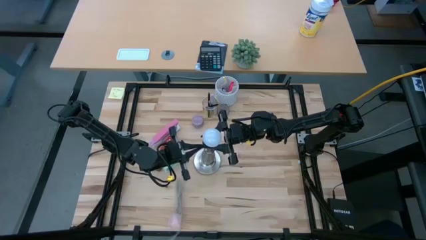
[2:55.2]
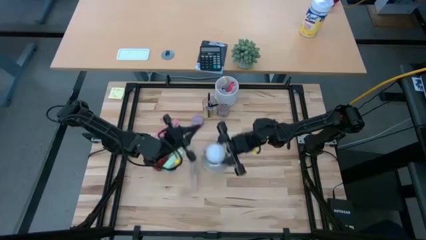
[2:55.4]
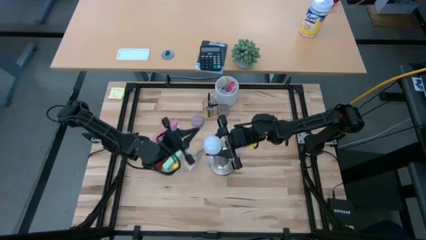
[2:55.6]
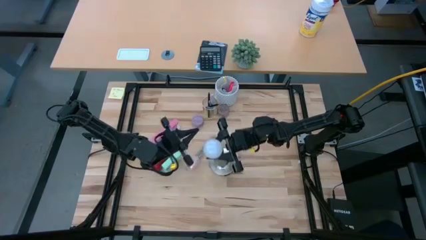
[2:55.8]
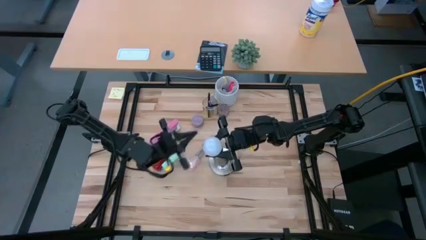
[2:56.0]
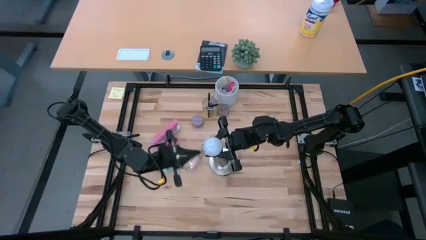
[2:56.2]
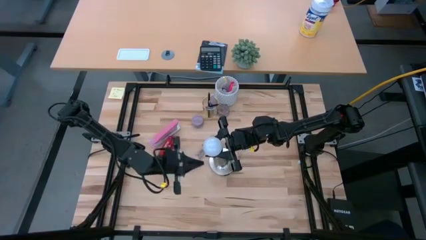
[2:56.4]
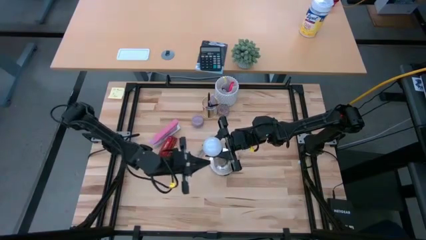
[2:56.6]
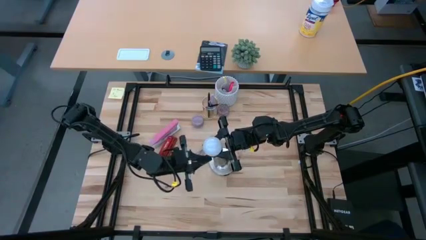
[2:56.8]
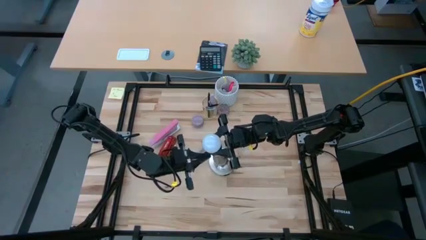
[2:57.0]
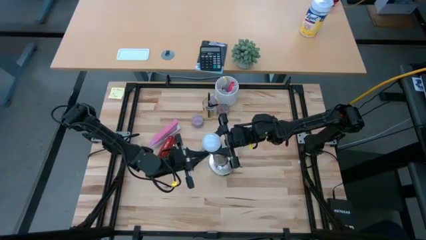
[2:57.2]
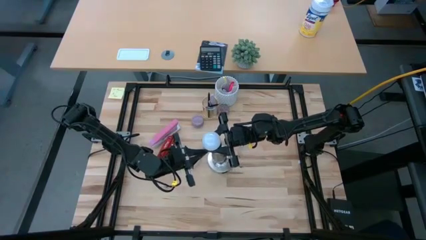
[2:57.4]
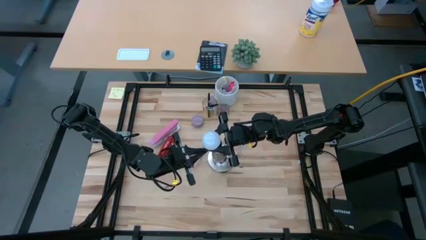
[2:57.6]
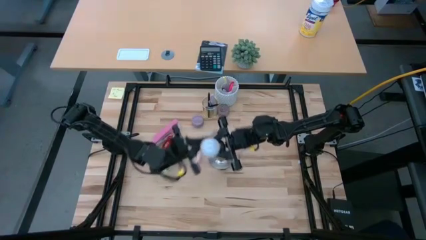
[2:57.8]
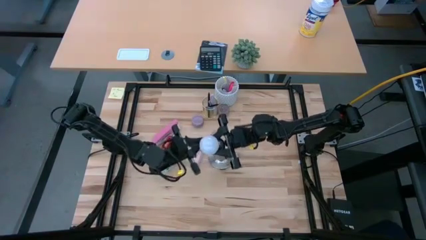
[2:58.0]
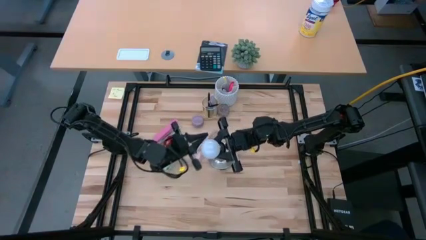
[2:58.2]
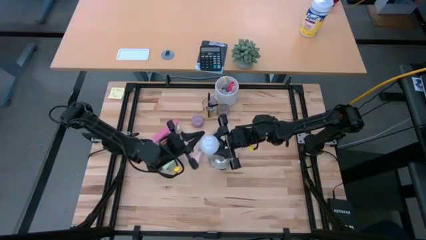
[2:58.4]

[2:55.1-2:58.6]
Task: Screw lightbulb
Remove the lightbulb from the lamp

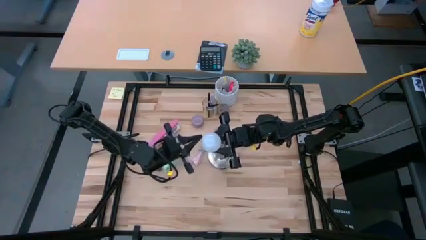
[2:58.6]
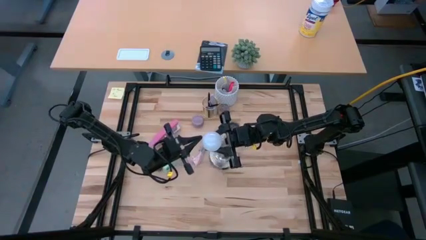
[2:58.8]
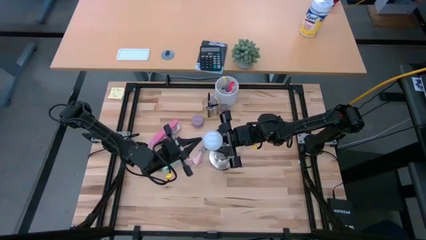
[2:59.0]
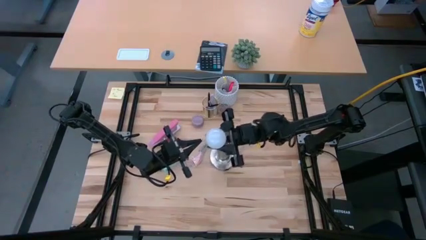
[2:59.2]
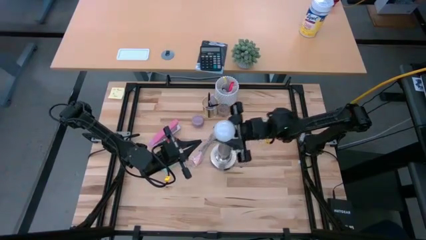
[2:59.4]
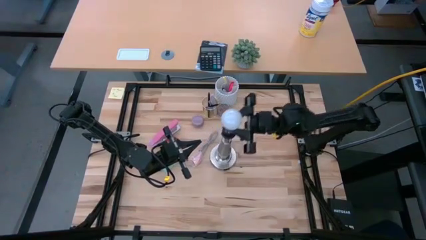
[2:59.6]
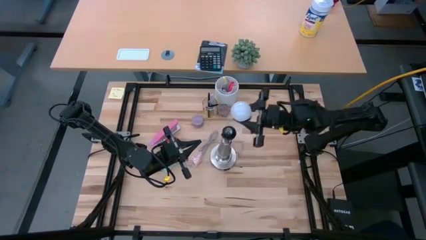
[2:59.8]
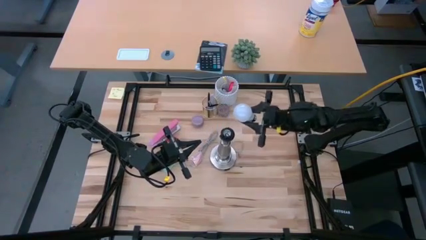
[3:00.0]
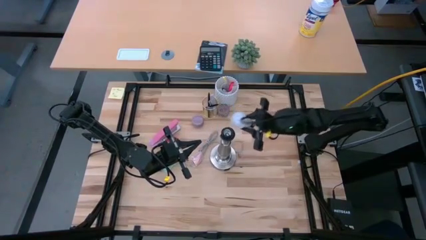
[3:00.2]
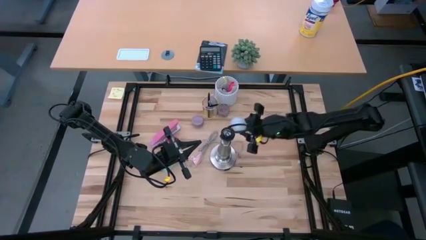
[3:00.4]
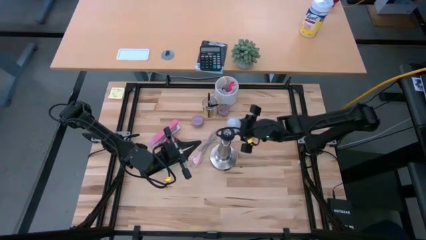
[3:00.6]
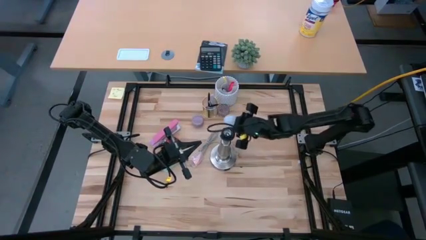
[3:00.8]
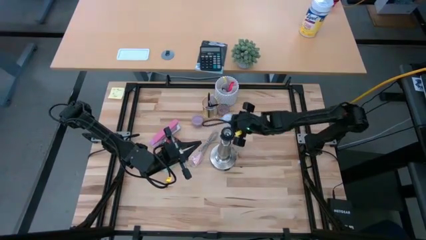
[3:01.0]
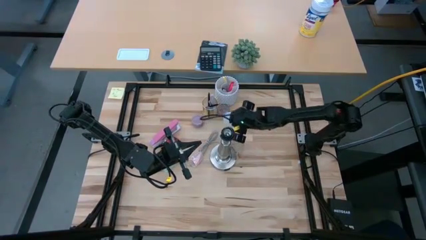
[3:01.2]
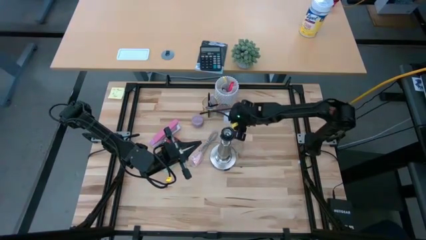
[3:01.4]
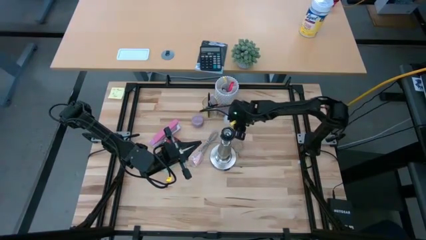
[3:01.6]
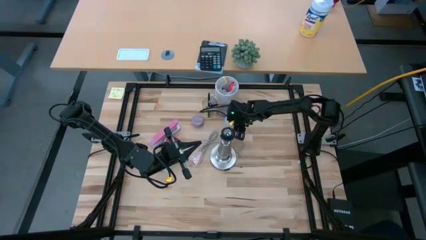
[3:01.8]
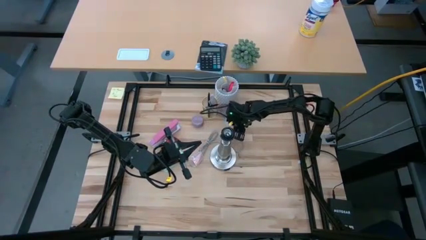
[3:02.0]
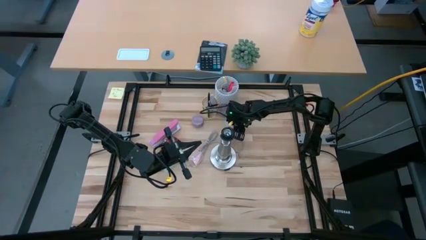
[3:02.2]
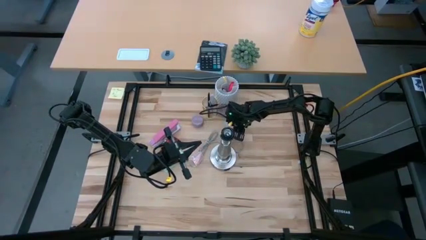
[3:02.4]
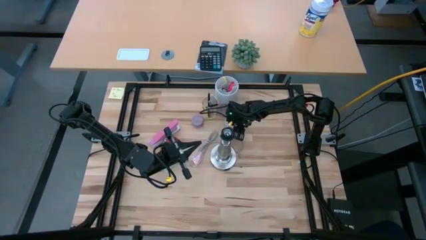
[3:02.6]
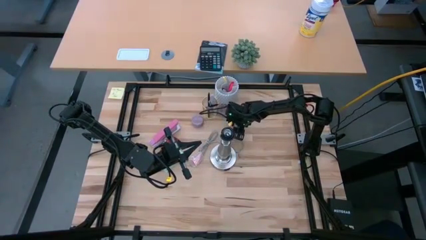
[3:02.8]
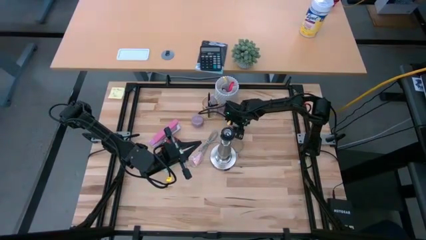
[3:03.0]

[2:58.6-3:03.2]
Remove the lightbulb from the lamp

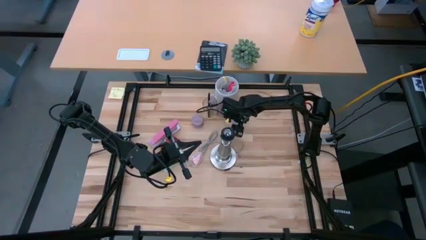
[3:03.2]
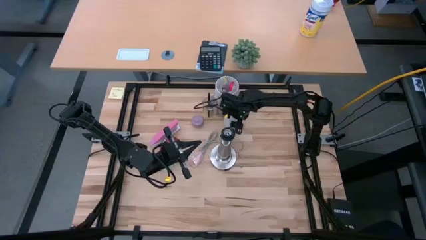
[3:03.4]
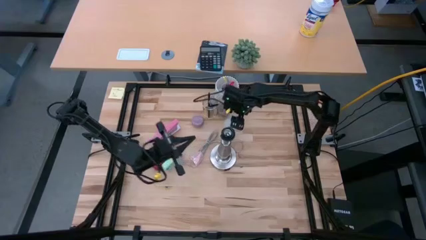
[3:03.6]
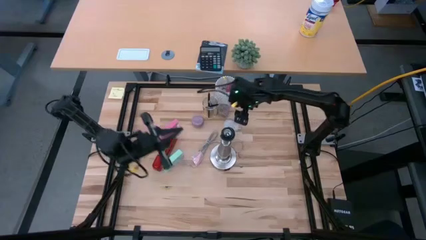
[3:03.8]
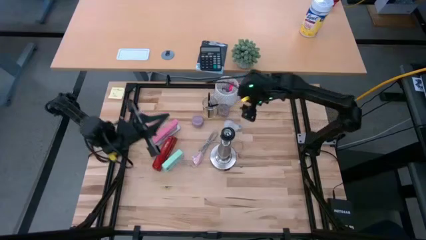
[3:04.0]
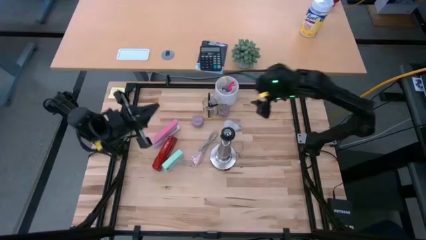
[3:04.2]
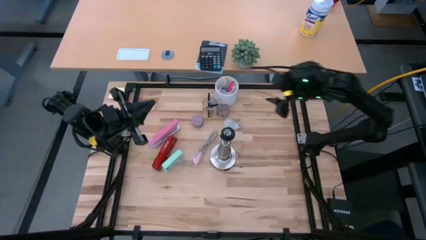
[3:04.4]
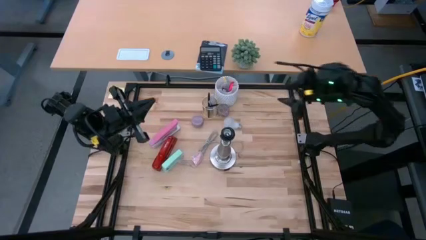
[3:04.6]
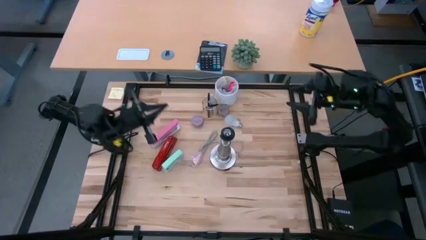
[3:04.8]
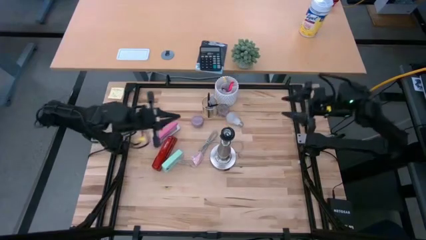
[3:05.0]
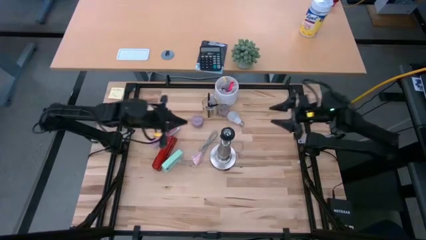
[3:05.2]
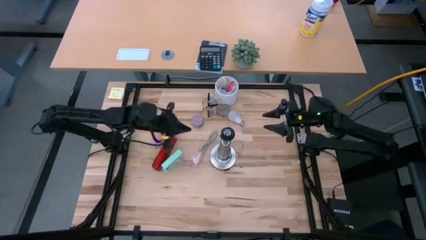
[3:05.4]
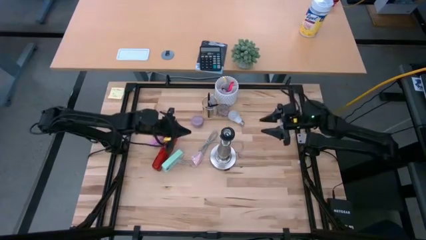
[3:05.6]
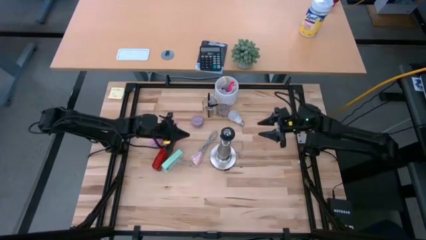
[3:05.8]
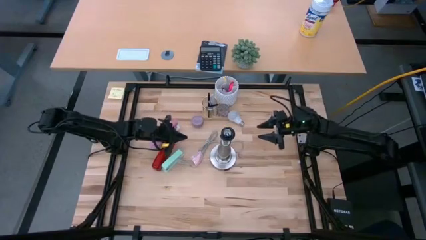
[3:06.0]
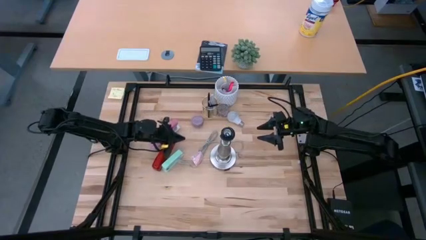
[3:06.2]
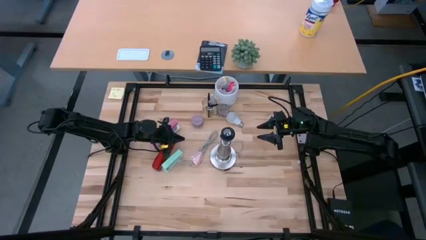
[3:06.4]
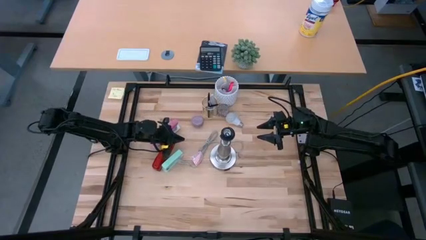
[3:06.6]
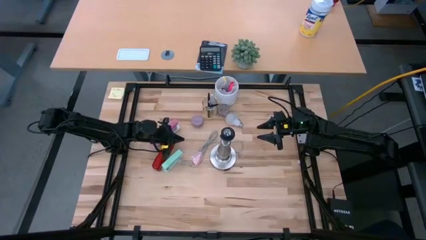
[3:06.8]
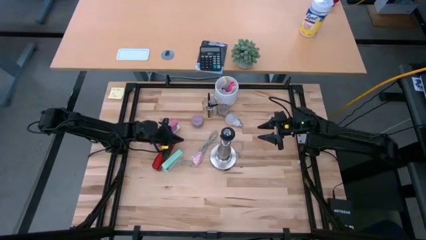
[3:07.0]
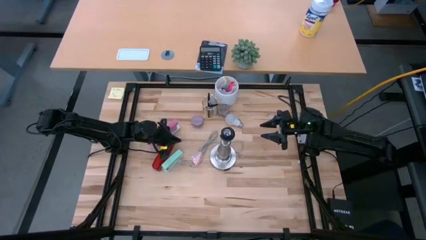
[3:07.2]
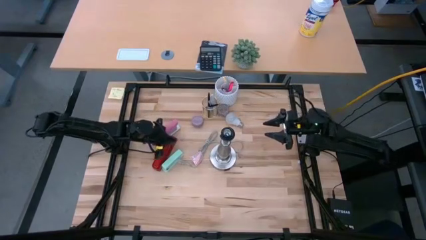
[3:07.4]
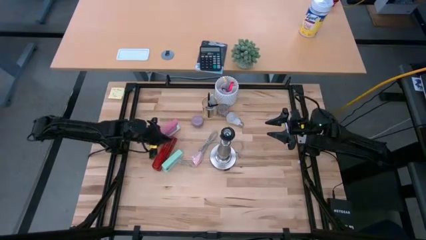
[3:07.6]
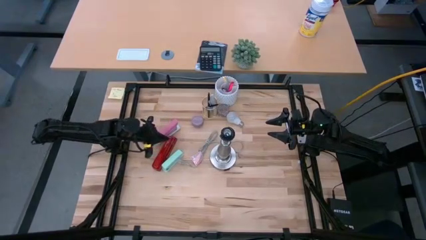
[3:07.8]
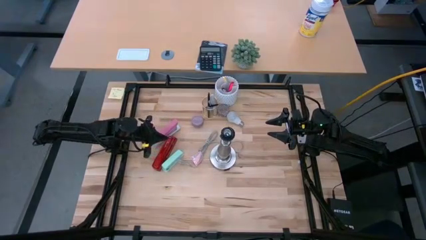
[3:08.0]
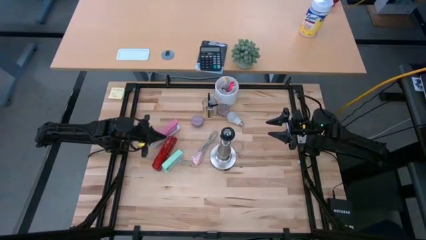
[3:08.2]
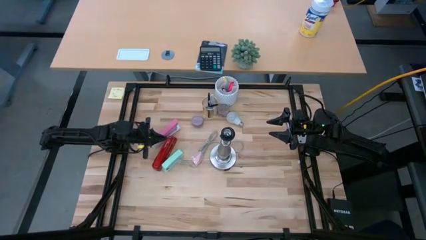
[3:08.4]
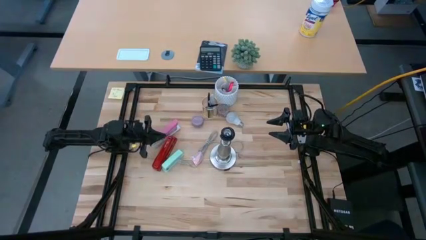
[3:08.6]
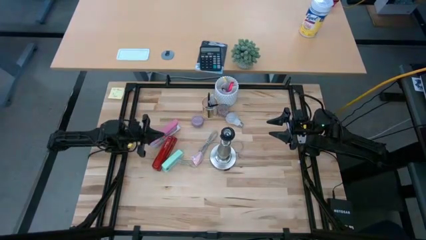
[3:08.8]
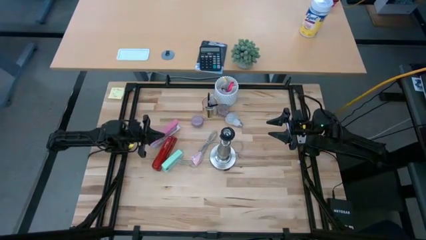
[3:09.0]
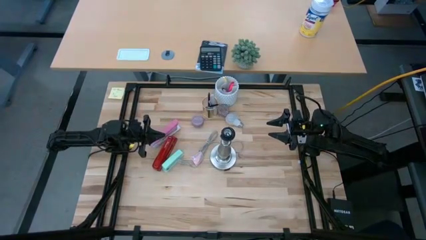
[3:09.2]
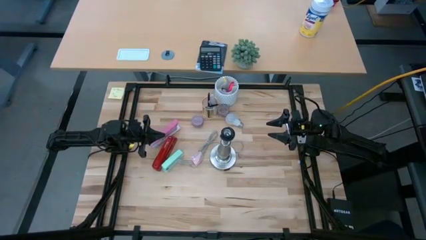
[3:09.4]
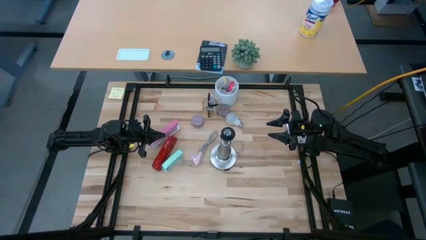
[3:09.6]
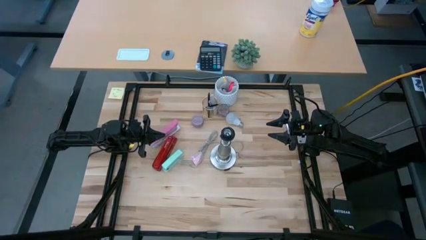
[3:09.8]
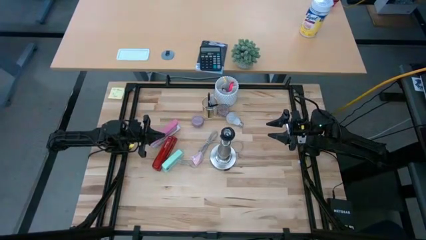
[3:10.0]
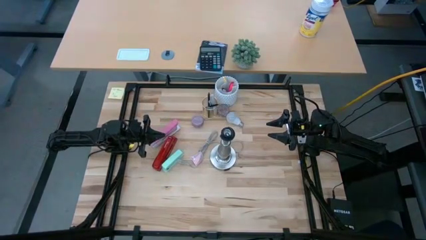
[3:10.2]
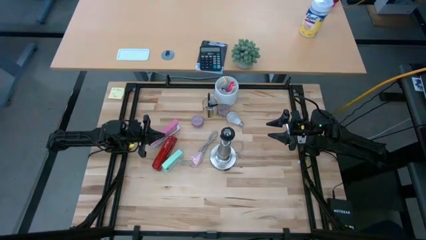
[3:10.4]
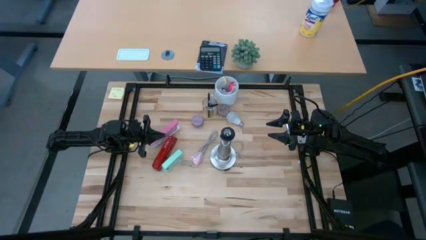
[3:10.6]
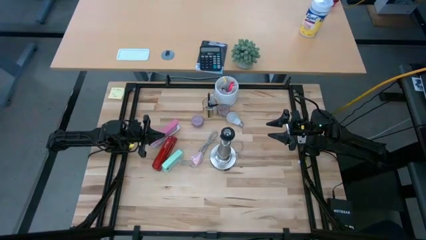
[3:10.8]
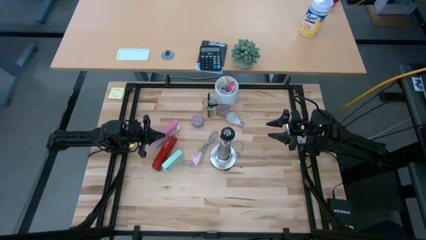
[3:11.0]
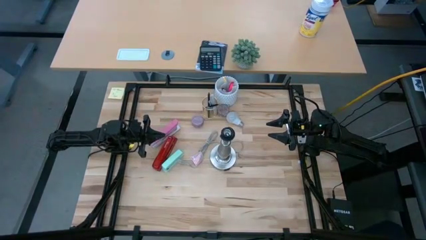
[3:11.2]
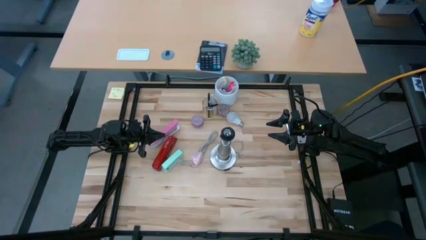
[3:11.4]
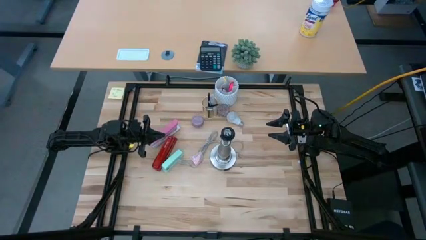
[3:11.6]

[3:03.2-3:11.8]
Return to Home Position
